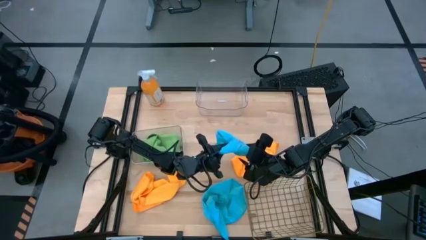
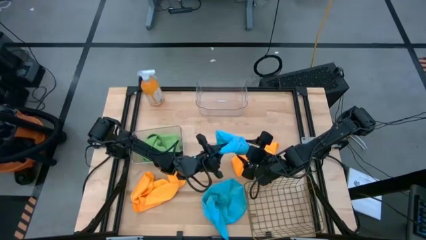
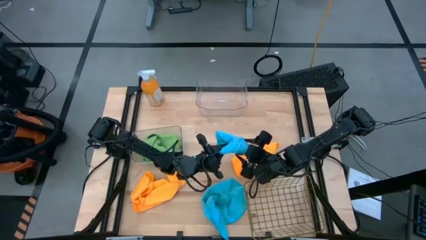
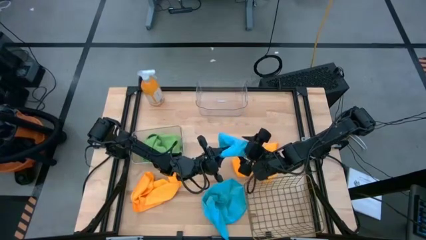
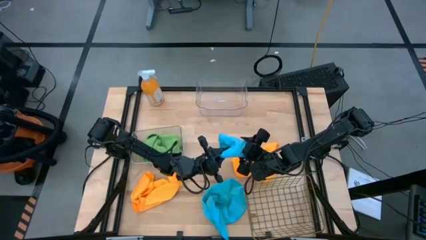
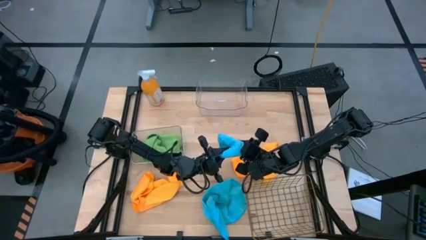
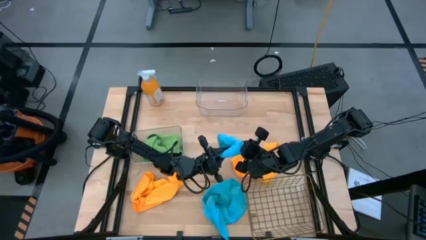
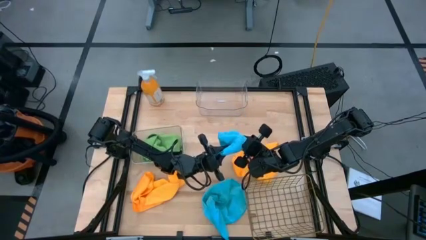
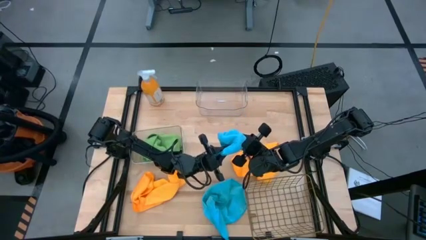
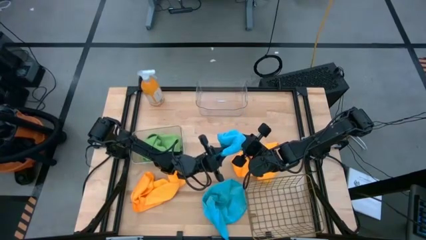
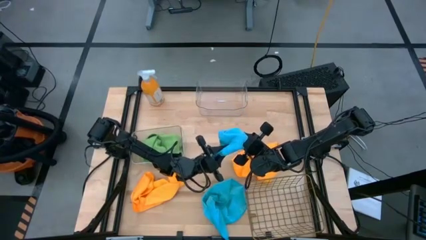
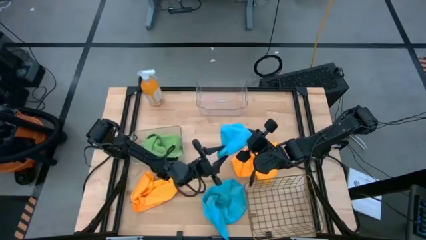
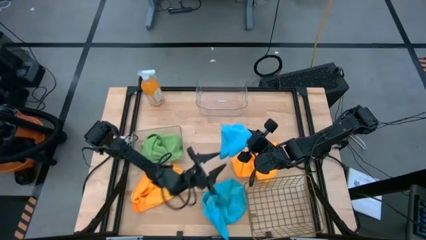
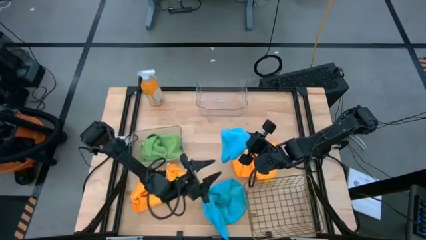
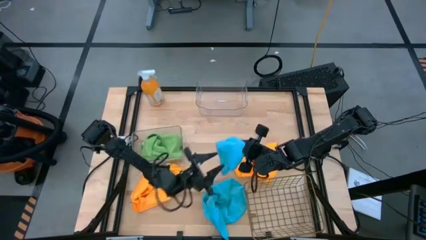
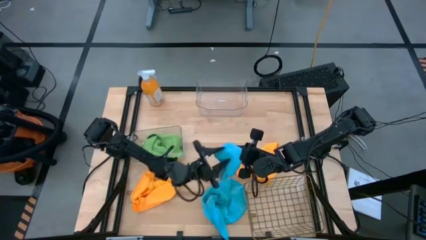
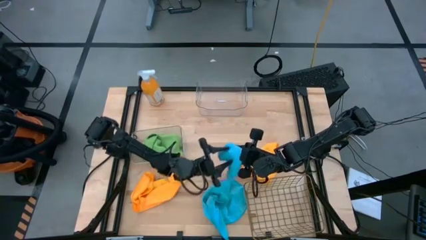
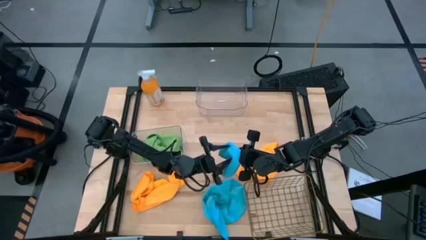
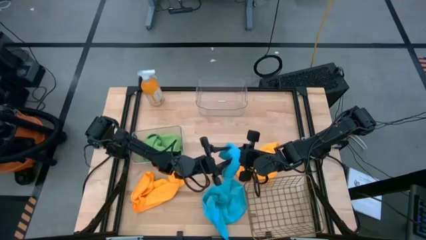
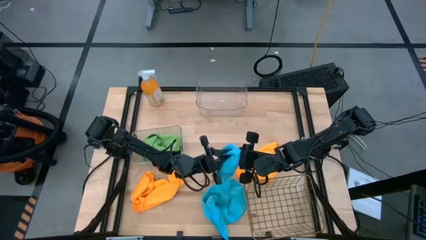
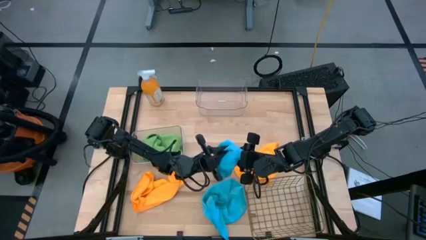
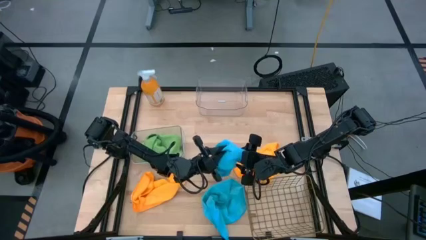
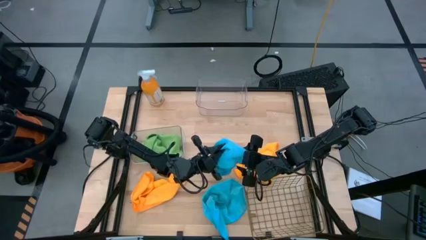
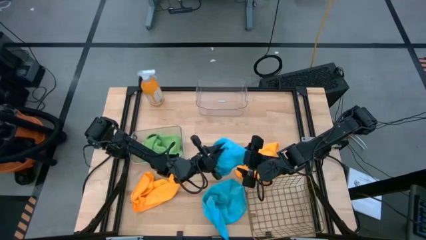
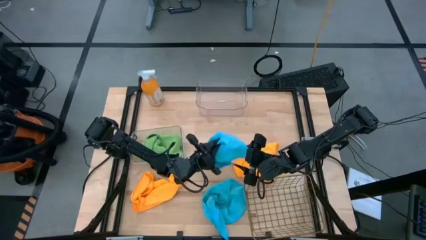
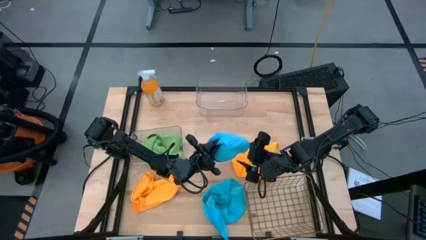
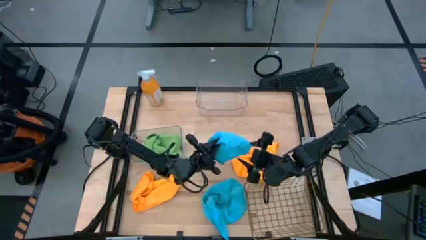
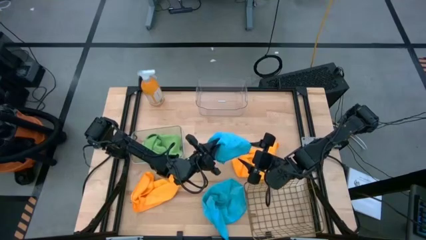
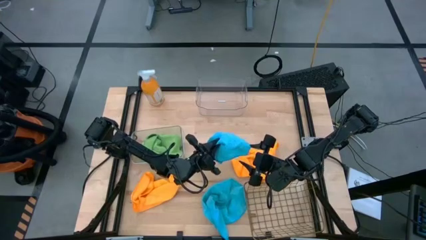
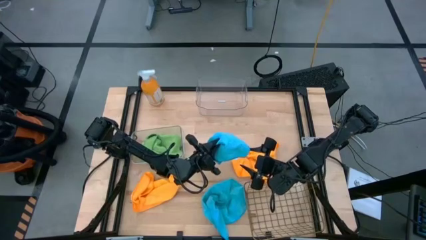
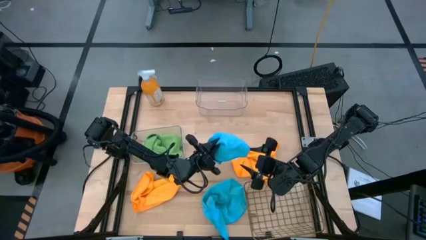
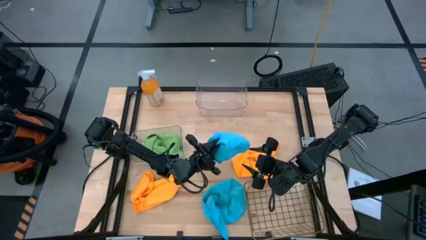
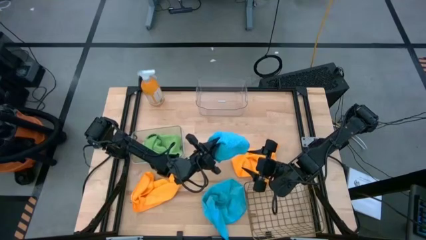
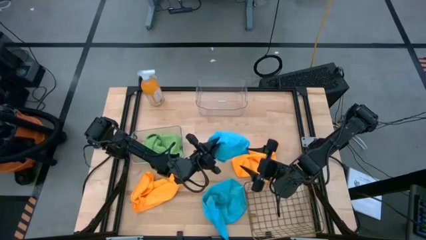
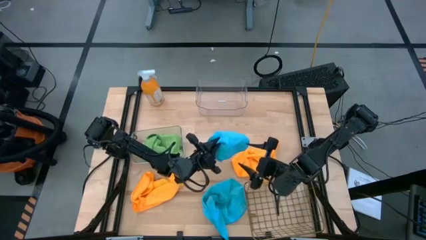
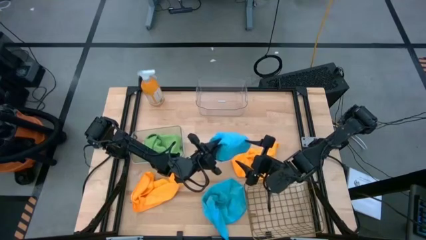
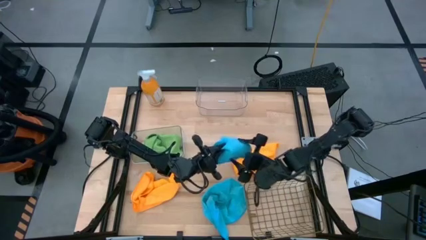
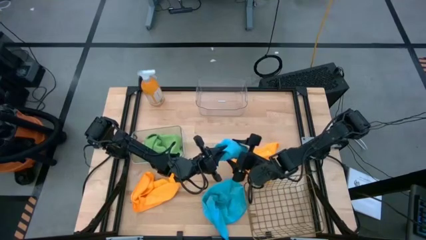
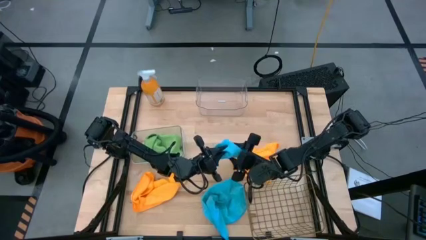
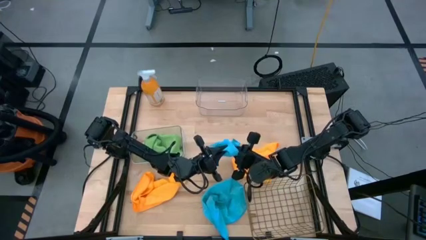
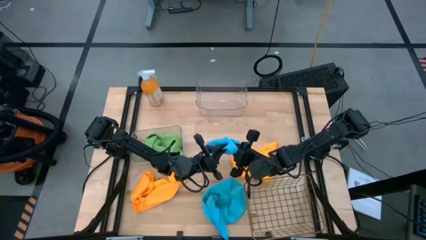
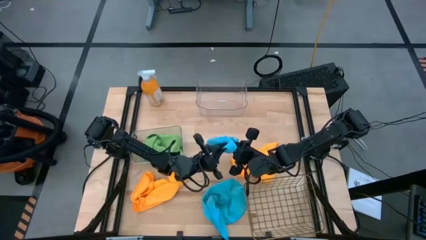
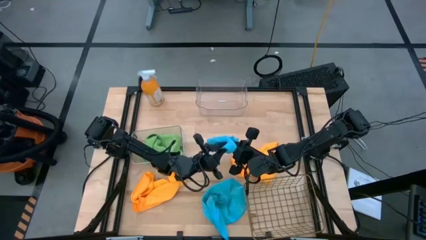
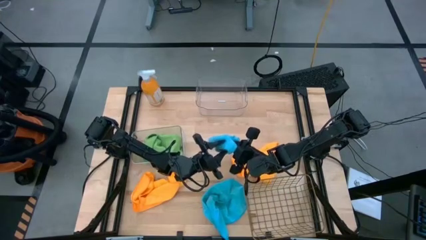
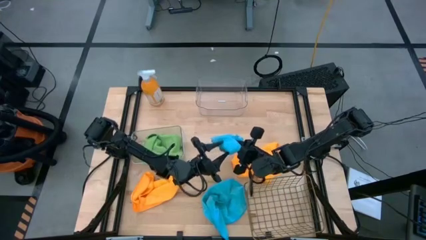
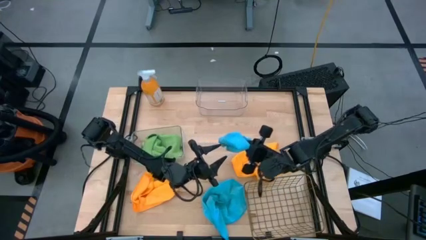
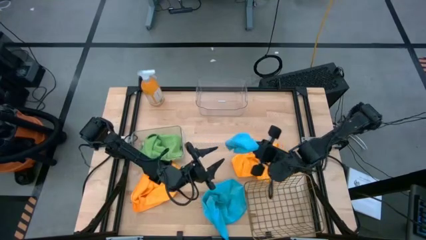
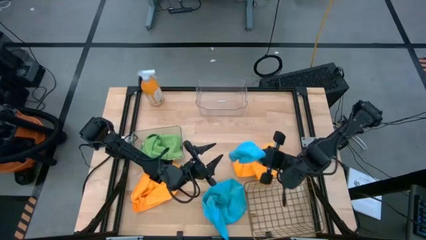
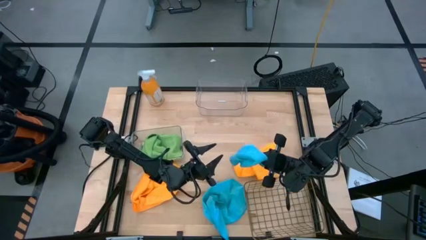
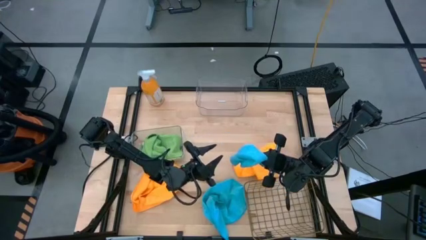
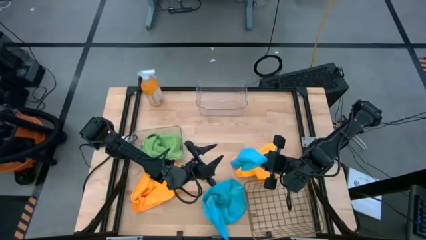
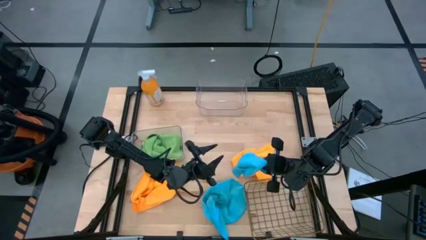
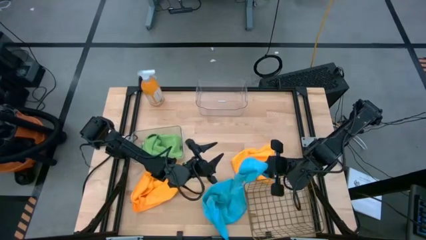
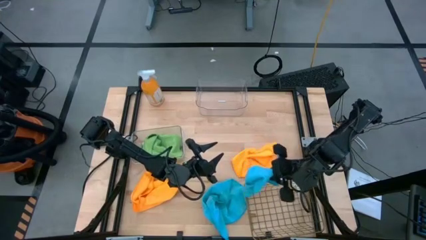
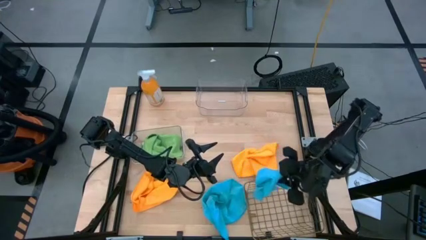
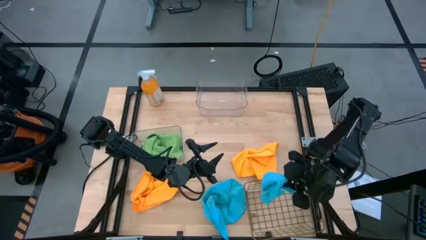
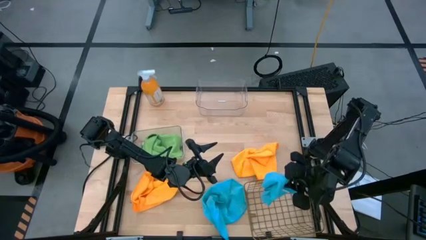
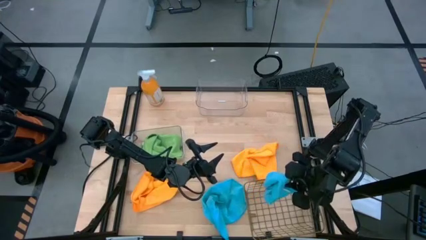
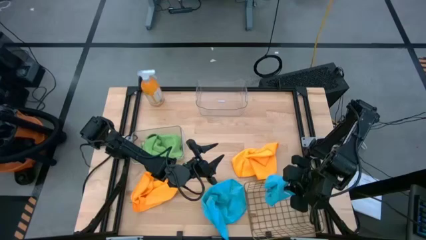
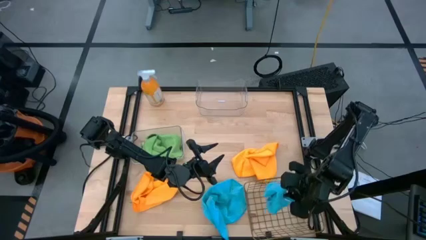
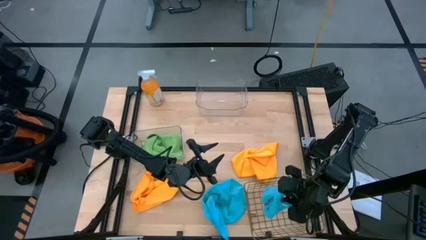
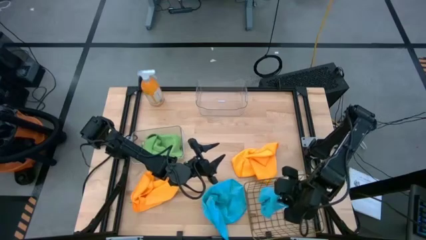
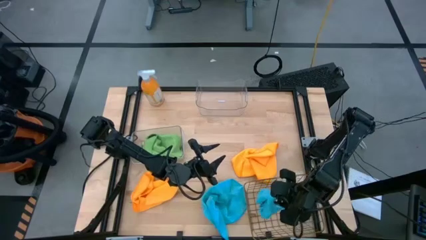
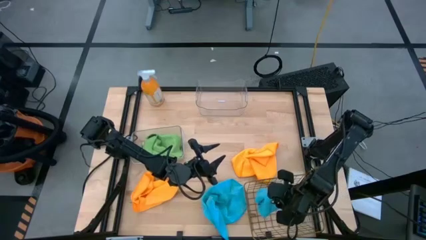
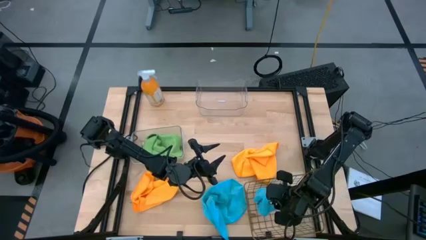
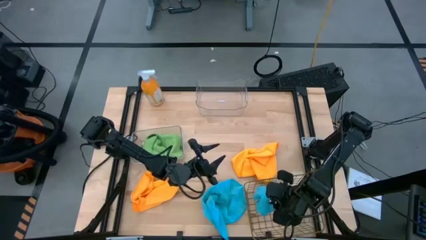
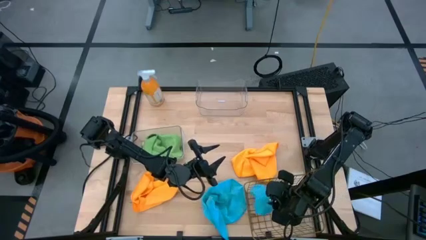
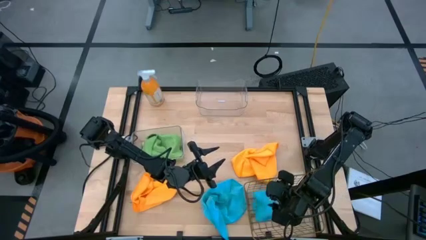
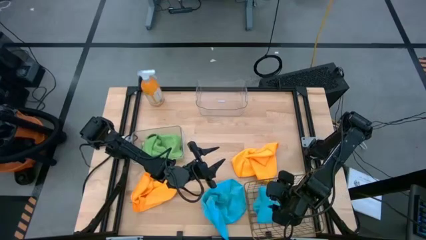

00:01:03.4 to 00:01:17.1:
Task: Sort microfiber towel by color & place in baskets
Put the top blue microfiber towel into the wire basket

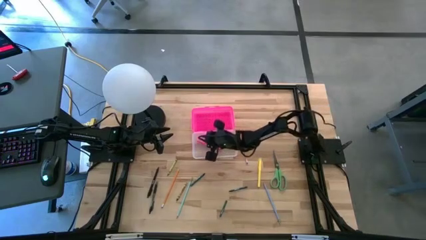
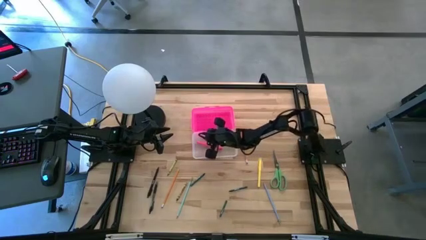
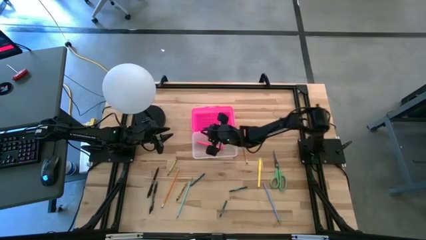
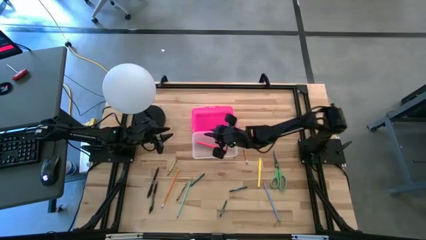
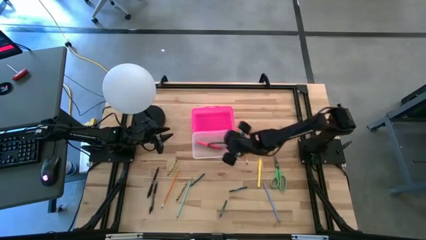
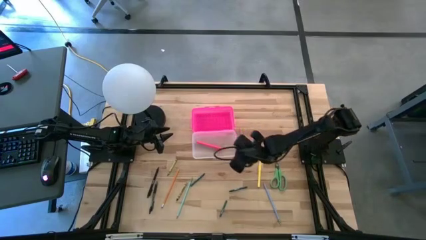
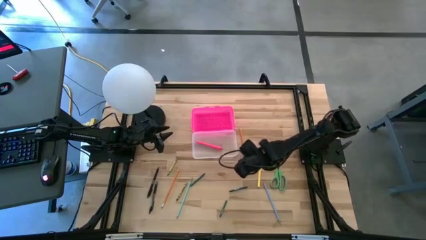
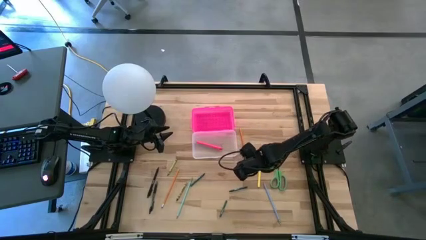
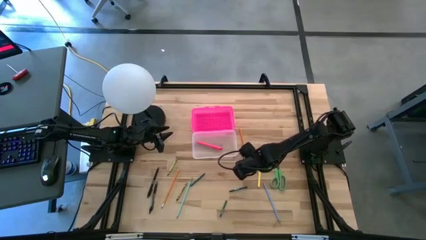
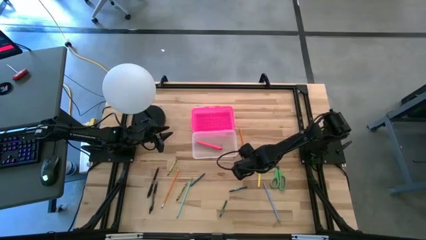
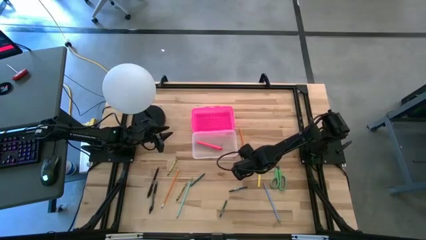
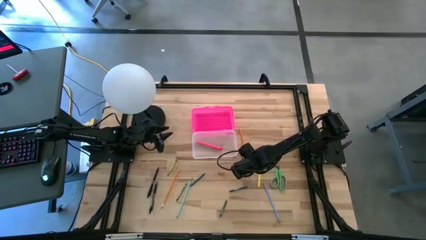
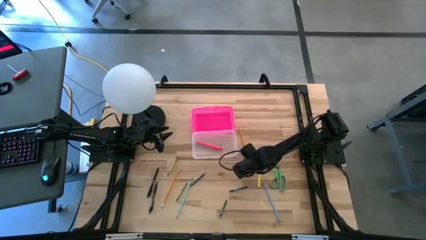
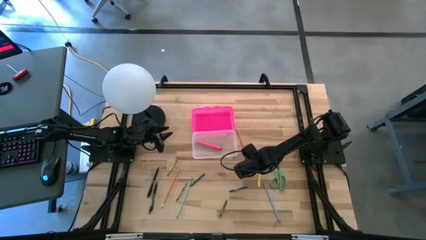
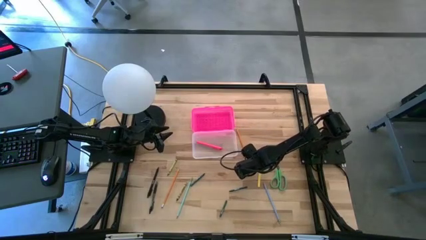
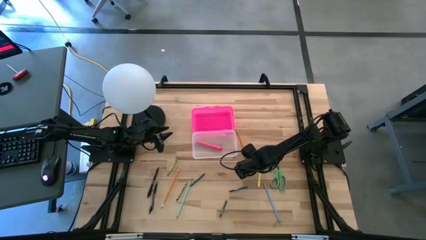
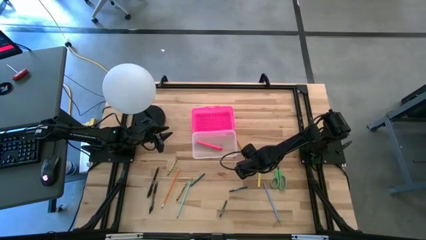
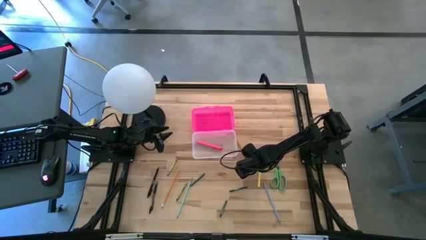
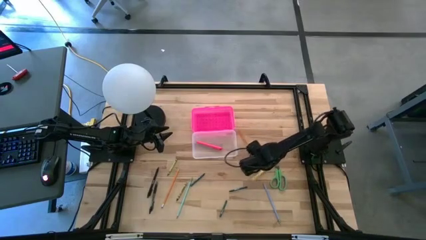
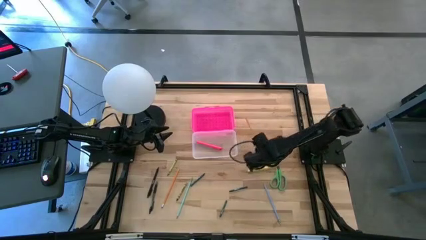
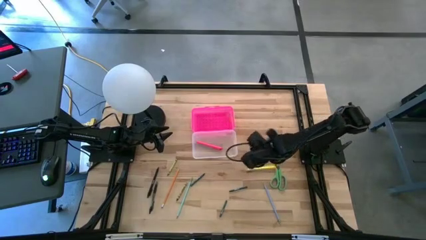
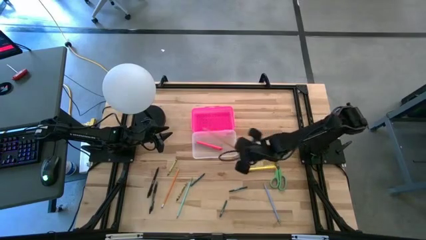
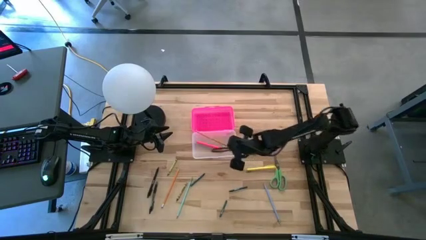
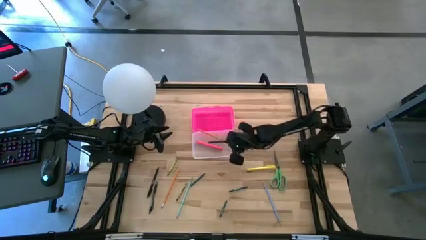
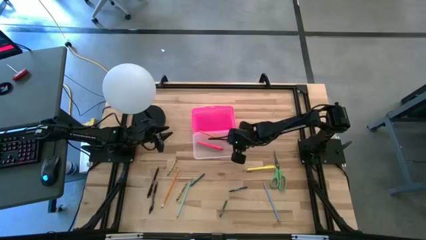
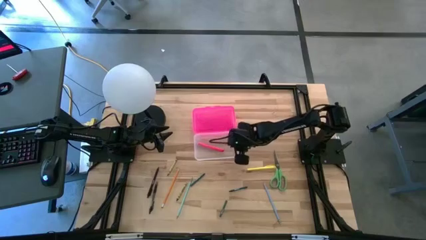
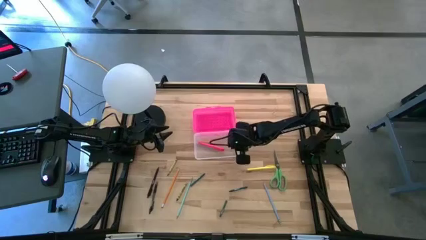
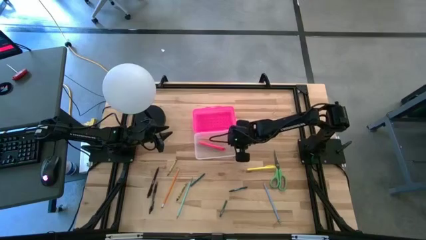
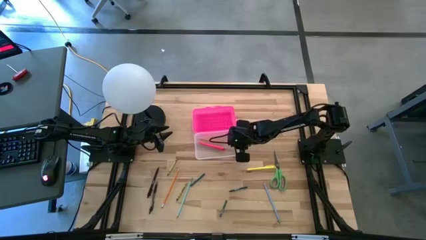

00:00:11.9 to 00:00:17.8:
Task: Pick & place school supplies into a supply box
Put the top orange pencil into the pink supply box
